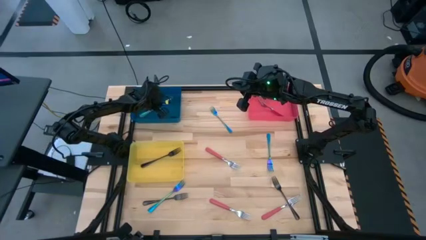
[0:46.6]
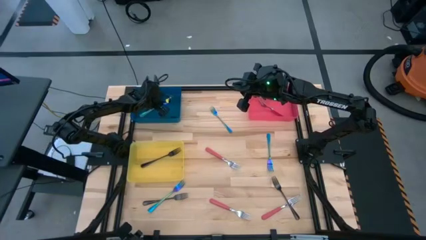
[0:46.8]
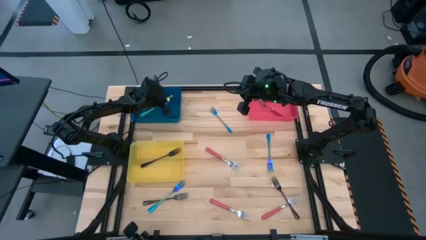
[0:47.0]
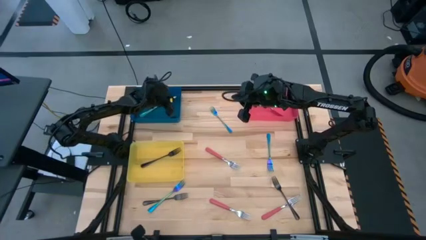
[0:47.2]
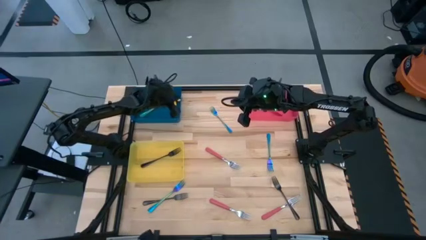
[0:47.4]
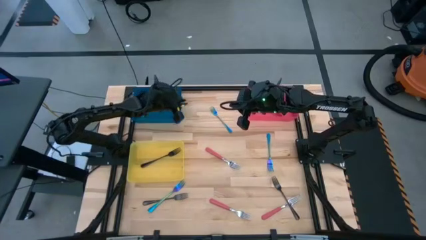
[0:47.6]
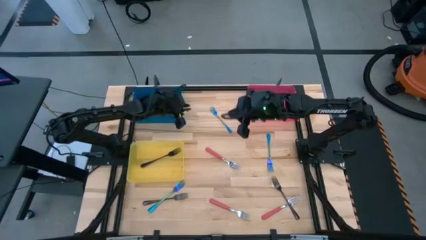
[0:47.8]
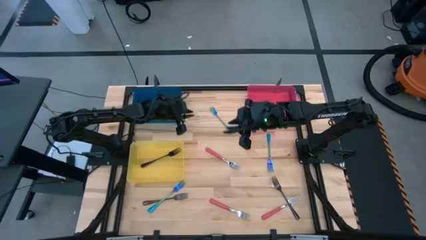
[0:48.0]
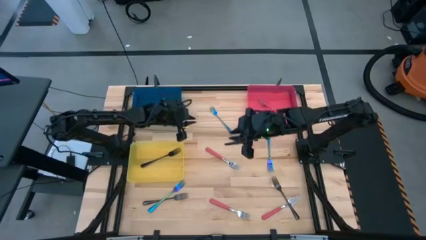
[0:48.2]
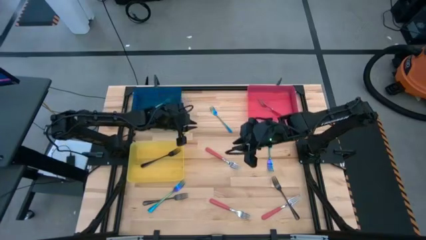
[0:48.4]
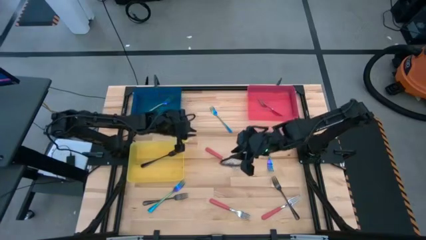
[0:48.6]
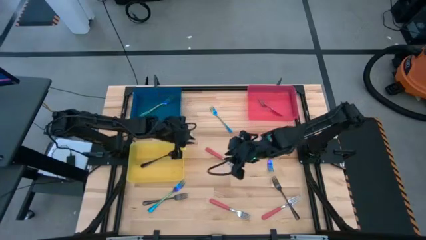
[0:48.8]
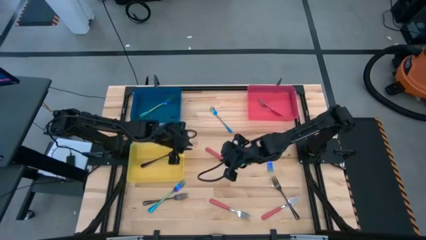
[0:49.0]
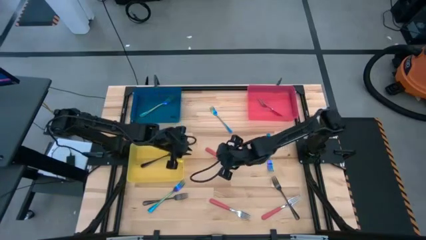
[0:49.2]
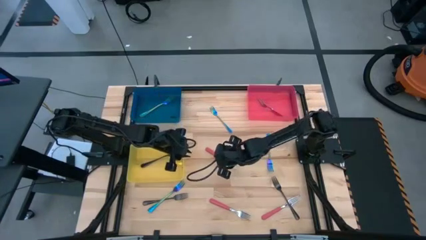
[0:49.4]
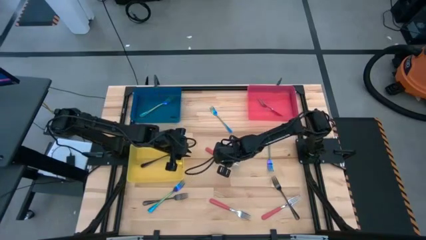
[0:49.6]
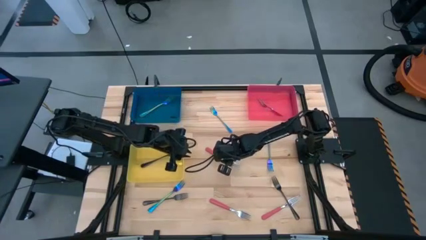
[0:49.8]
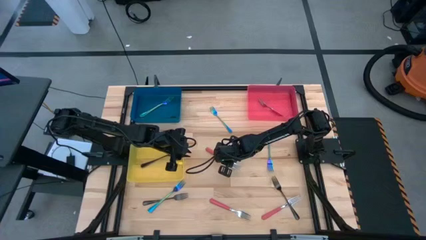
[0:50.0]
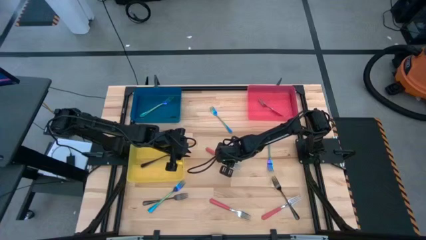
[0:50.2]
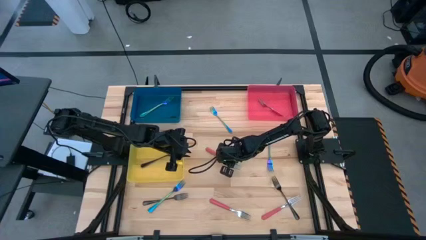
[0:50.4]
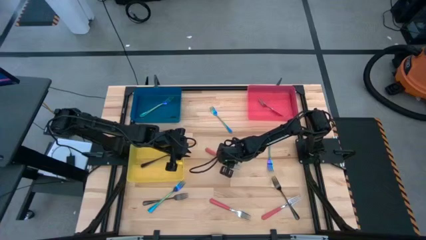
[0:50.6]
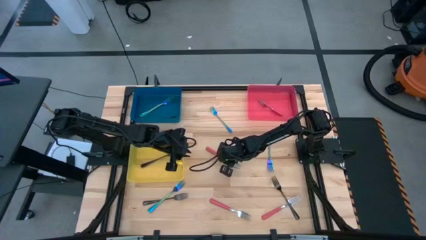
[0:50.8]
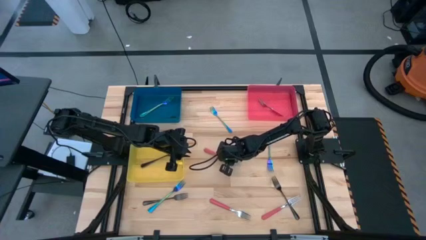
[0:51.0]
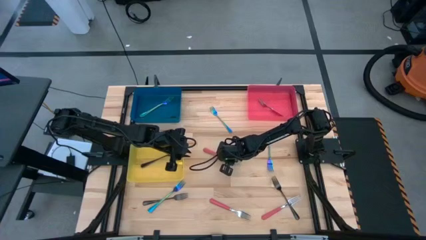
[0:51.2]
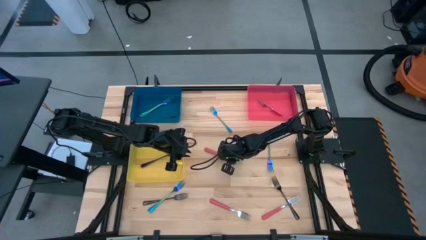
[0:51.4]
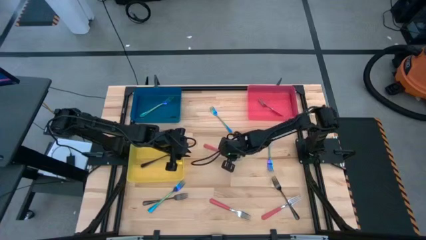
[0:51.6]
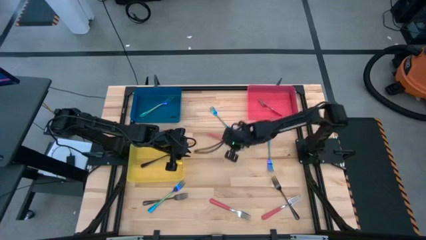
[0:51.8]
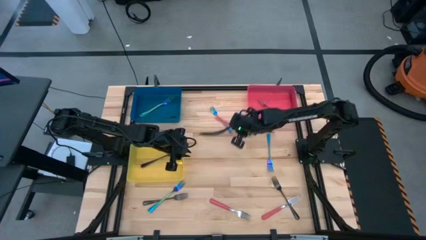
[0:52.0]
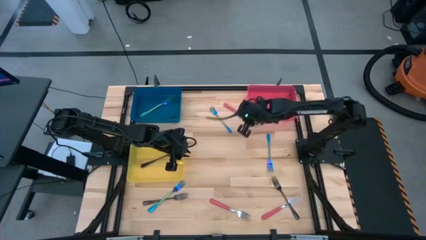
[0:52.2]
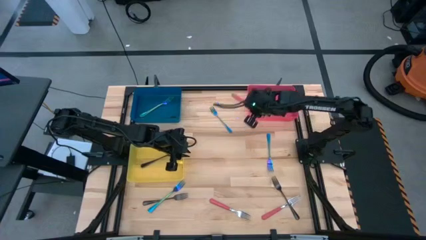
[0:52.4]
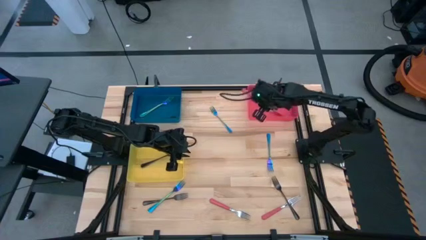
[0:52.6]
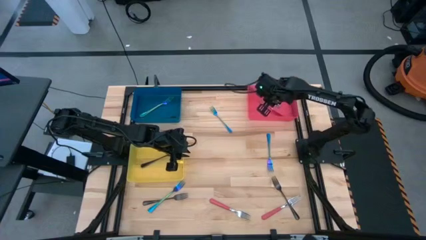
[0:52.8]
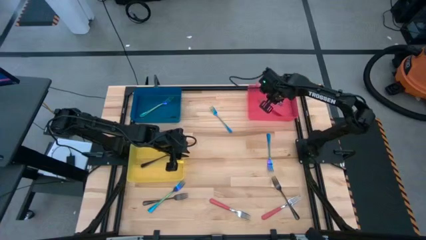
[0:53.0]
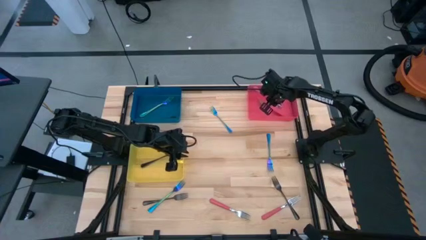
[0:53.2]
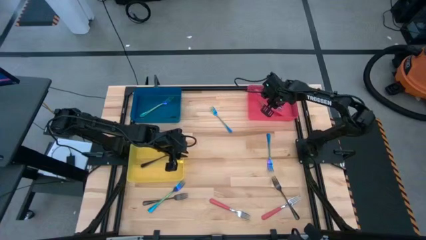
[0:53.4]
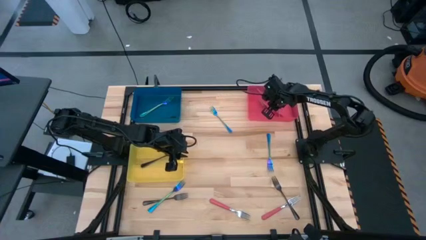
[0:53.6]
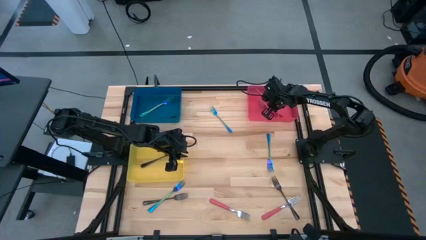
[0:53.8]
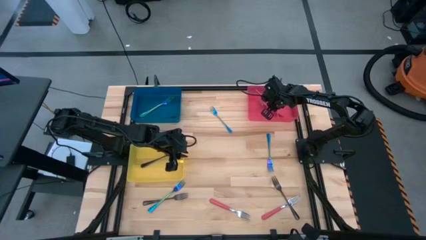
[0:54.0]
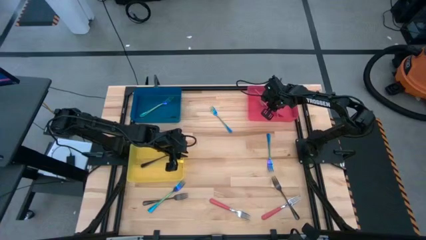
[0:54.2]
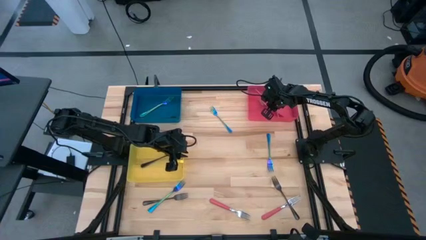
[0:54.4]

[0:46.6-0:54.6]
Task: Sort silverware by color (type)
Put the pink fork into the red bin

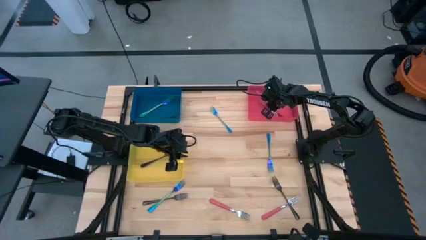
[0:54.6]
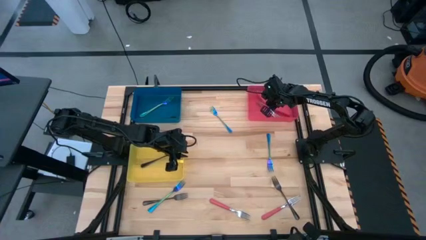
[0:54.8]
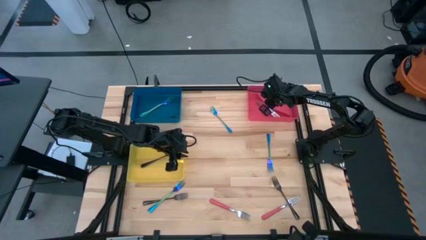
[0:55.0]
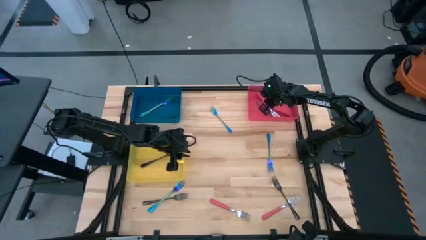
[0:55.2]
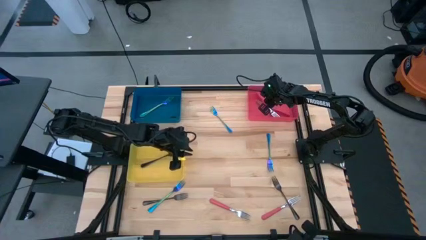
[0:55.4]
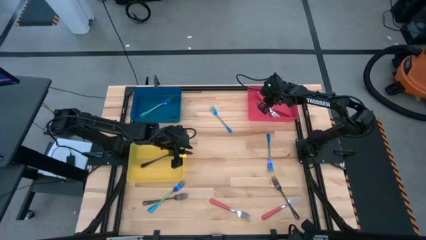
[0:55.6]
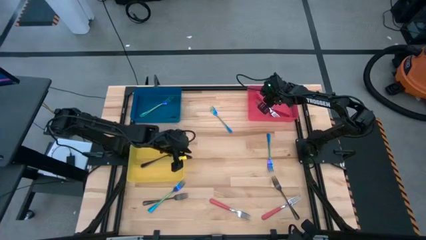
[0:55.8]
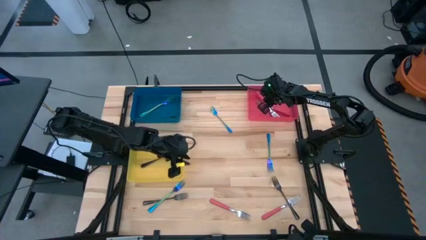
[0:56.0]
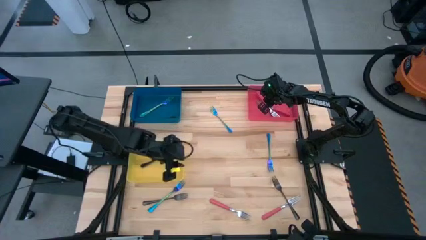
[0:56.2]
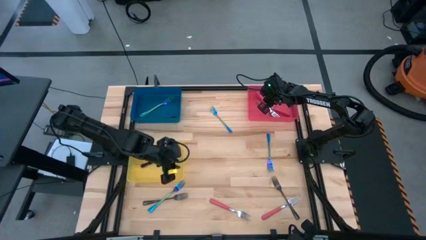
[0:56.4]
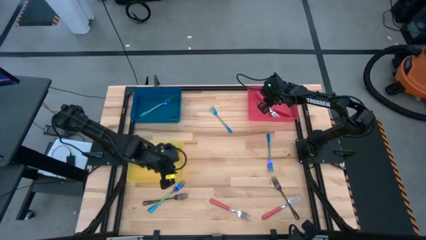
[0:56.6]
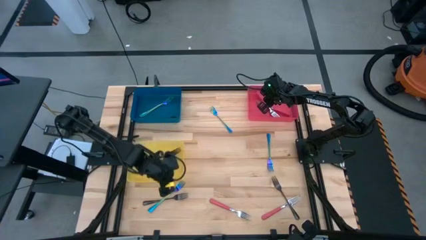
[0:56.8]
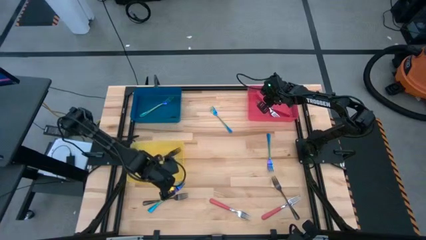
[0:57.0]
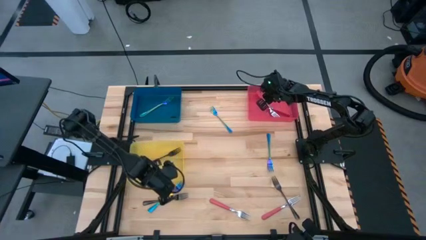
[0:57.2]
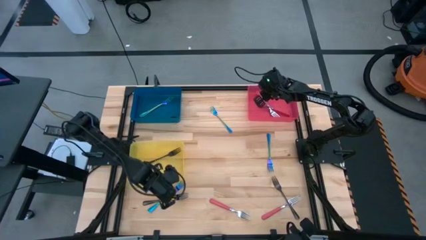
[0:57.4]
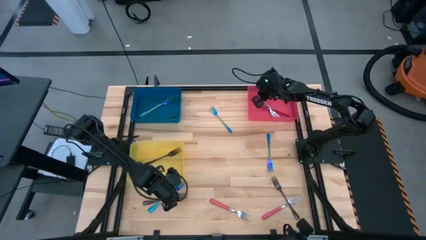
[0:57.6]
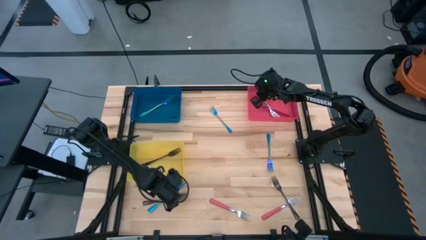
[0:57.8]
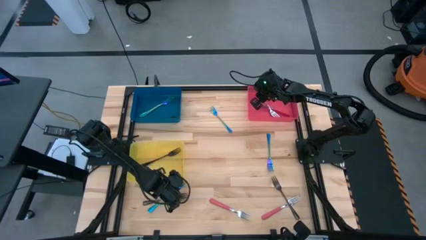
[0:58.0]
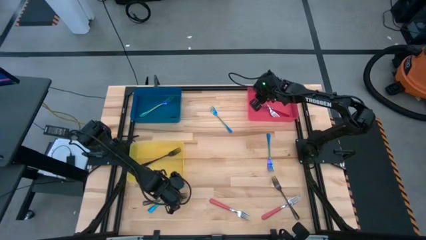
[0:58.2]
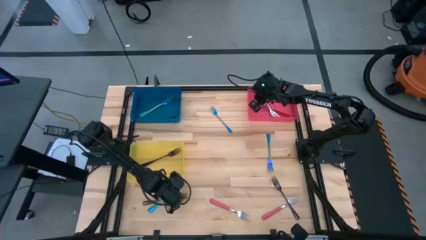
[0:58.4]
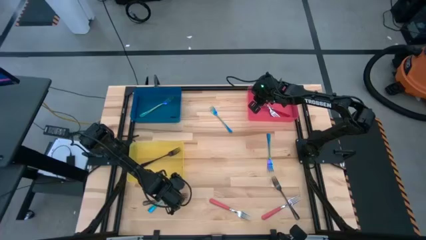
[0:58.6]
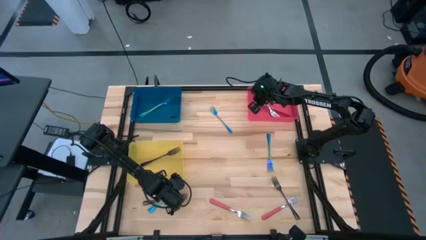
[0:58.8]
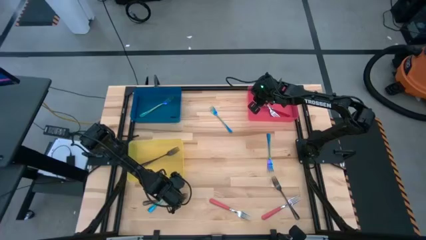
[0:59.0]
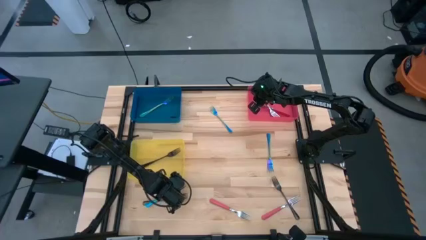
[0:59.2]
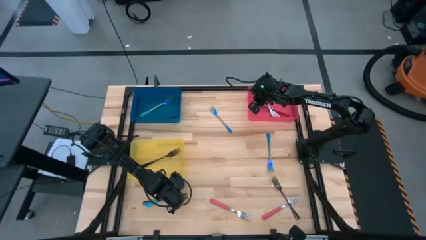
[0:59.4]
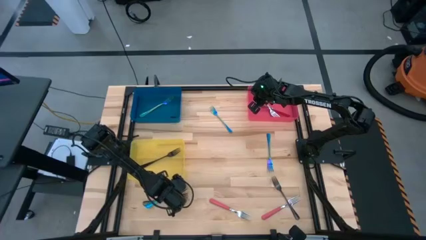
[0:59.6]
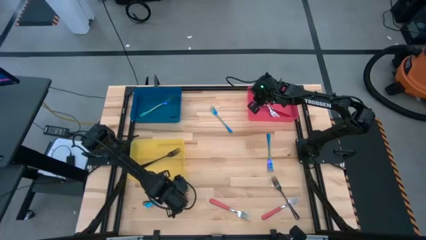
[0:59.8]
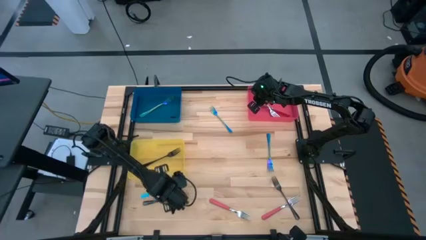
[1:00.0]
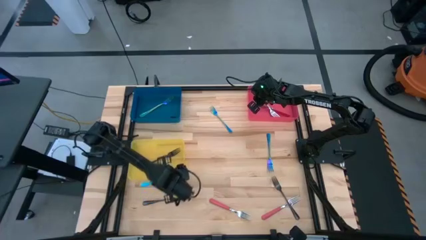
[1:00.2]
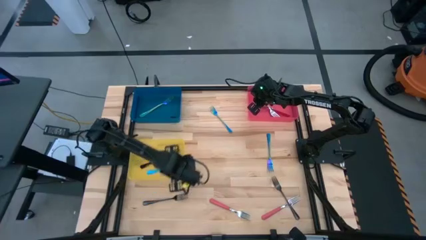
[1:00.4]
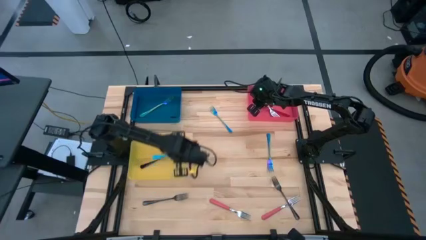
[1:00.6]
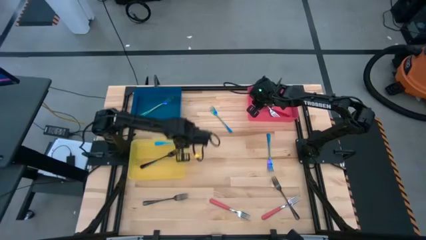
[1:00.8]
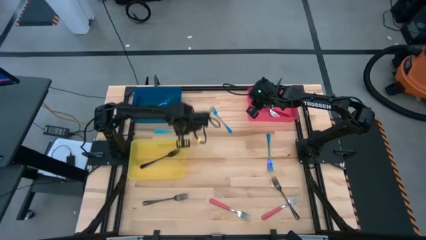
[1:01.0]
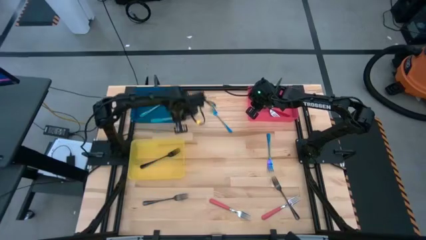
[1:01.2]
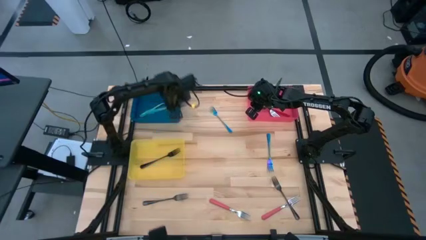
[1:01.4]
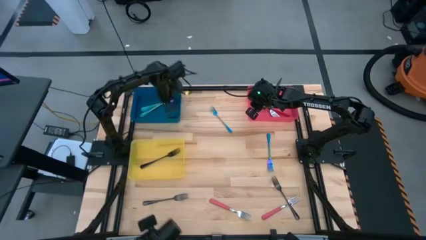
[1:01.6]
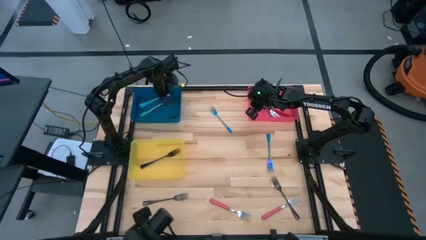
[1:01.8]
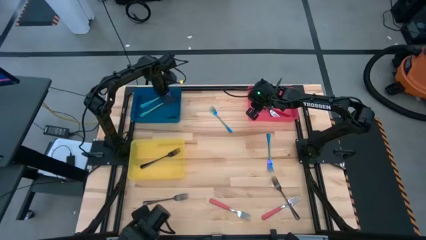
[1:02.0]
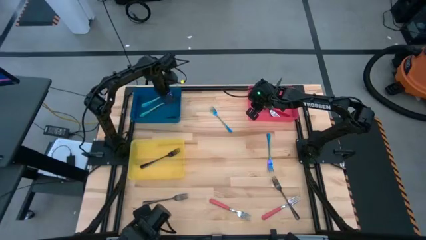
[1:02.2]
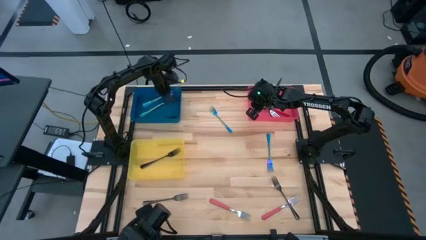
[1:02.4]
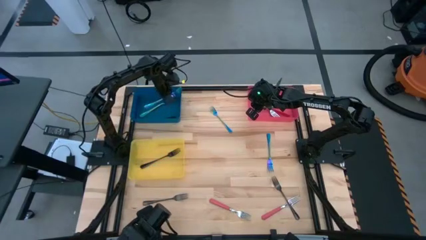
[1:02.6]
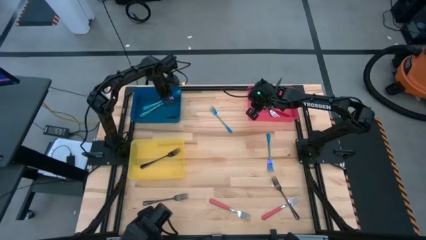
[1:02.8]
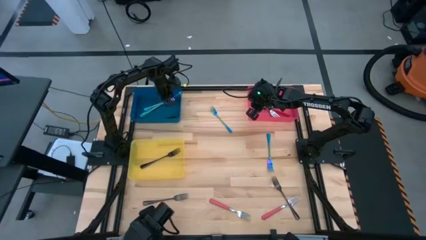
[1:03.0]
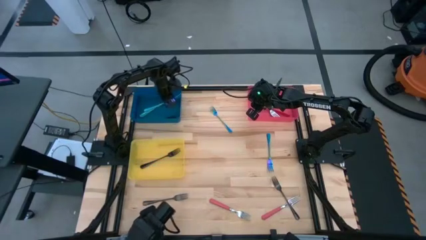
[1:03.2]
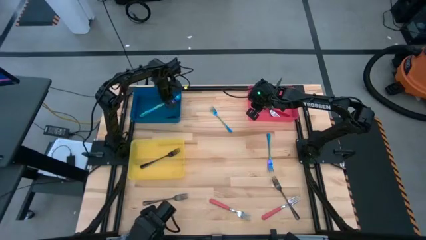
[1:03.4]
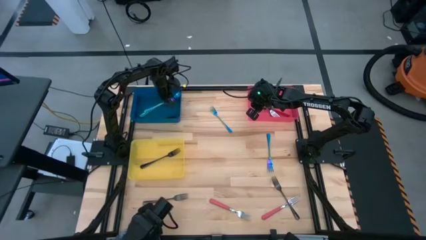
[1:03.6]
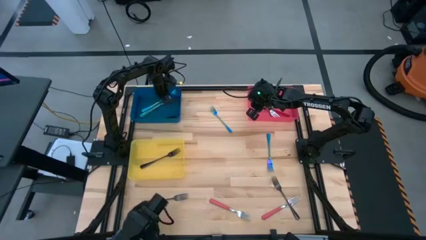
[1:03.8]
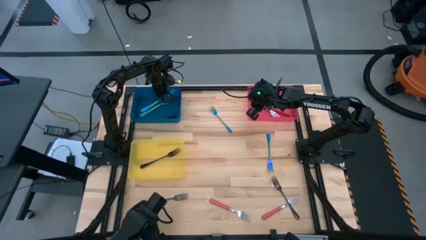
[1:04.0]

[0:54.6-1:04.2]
Put the blue fork into the blue bin
